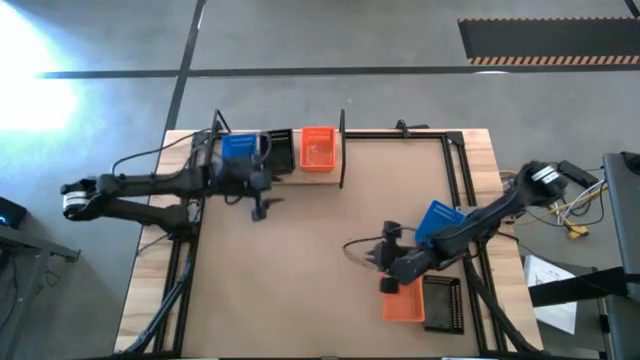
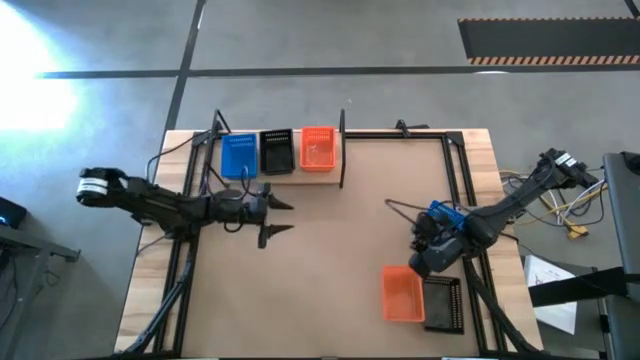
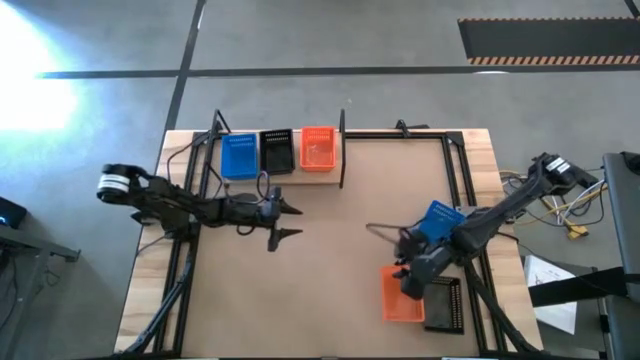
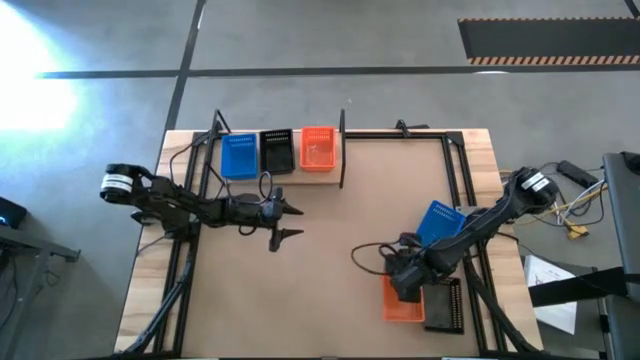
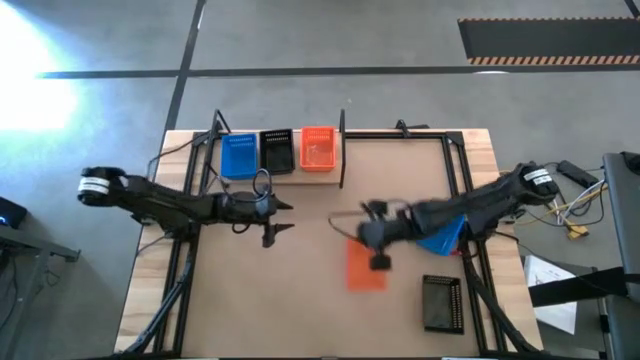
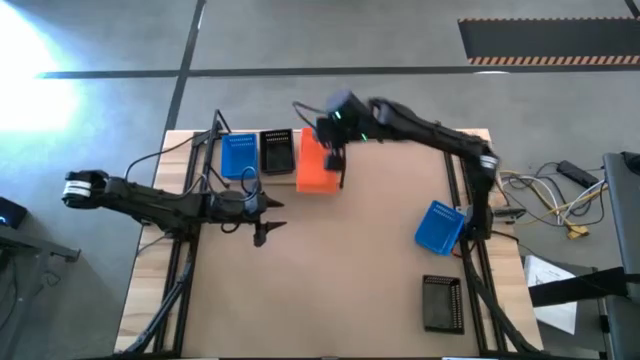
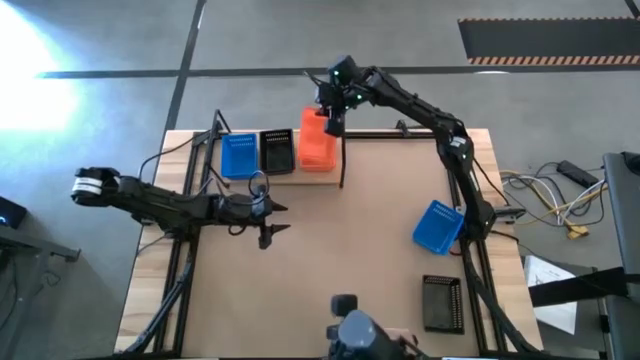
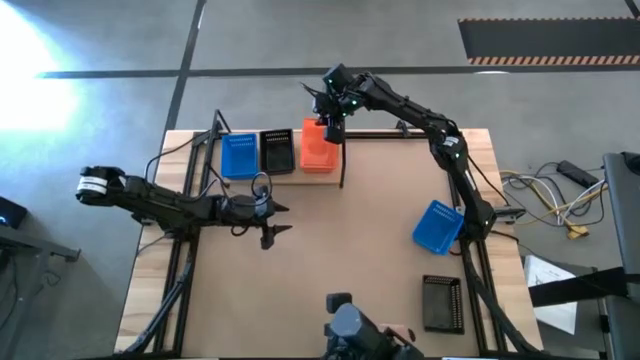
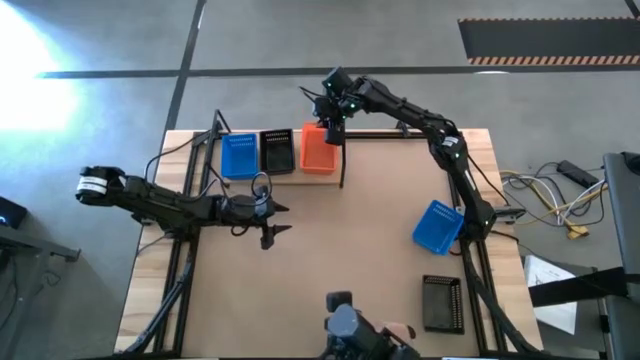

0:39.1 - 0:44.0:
Task: Stack baskets on shelf by color
Stack the orange basket on top of the other orange baskets on the shelf

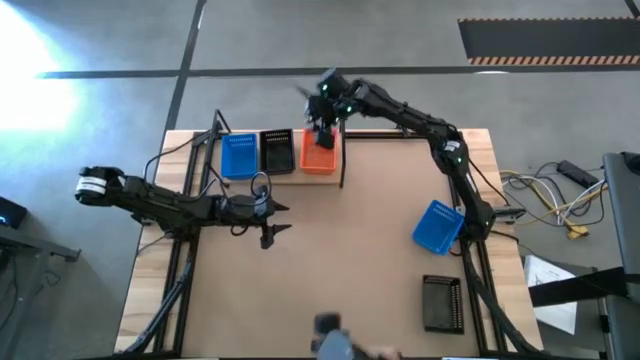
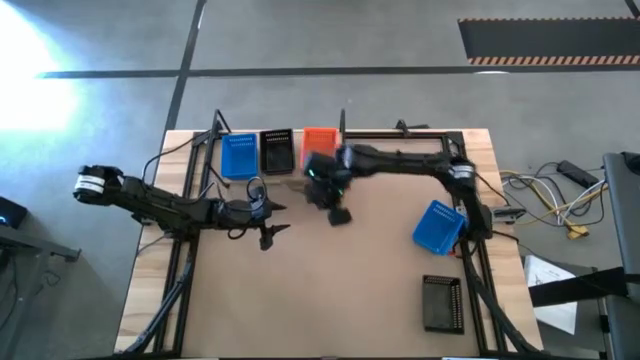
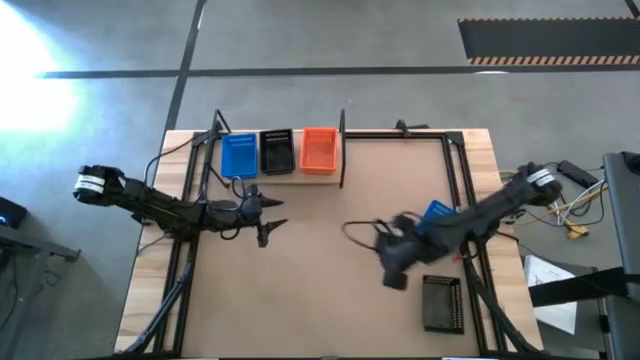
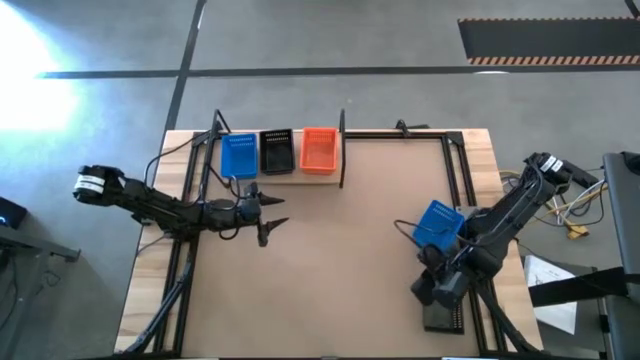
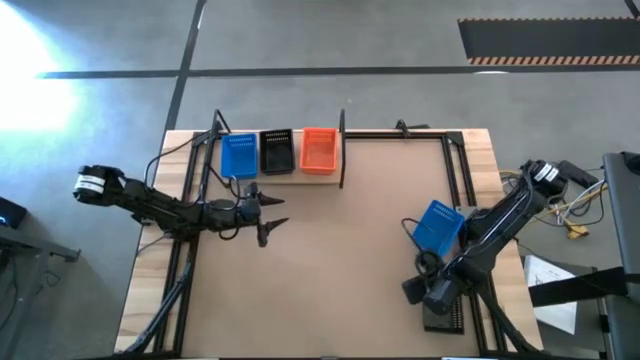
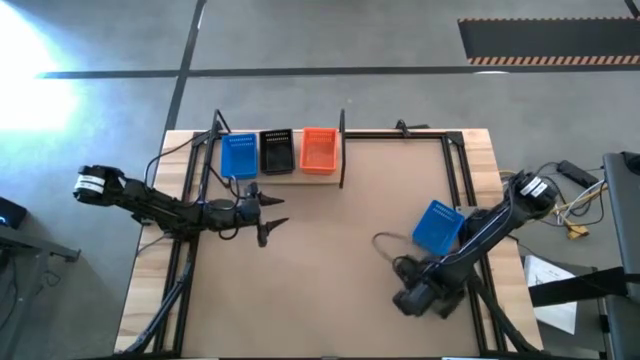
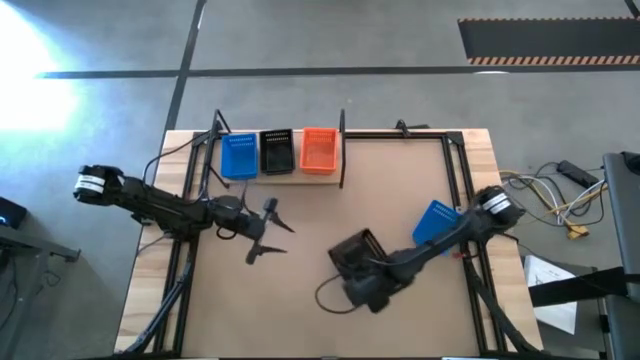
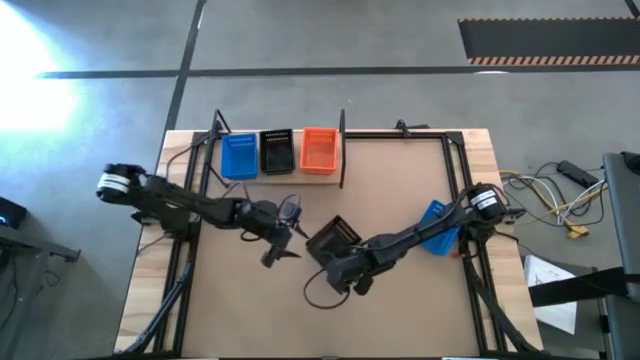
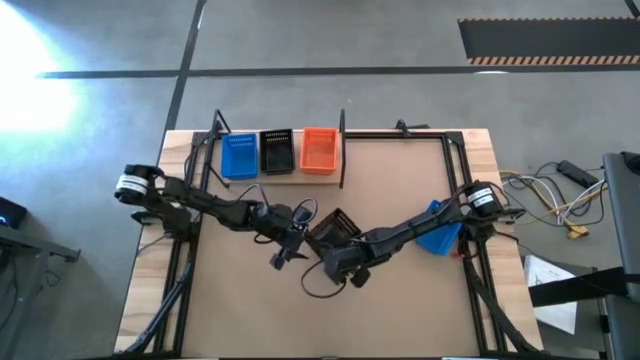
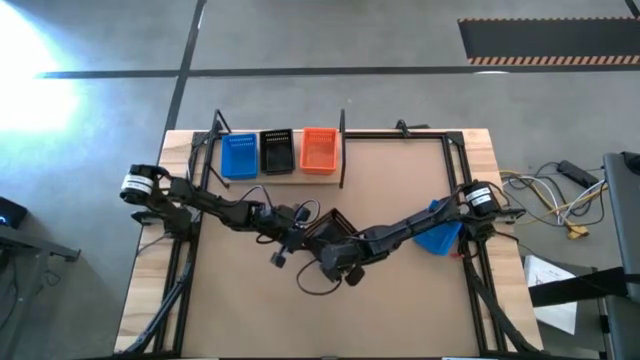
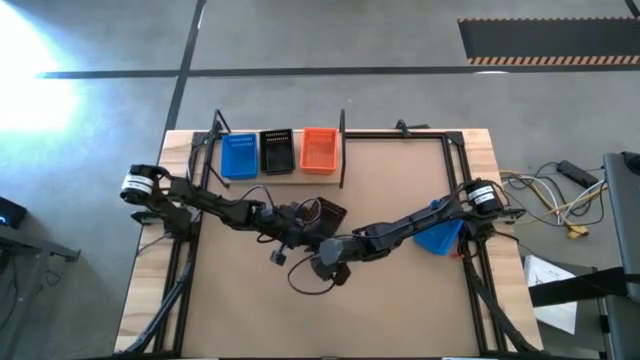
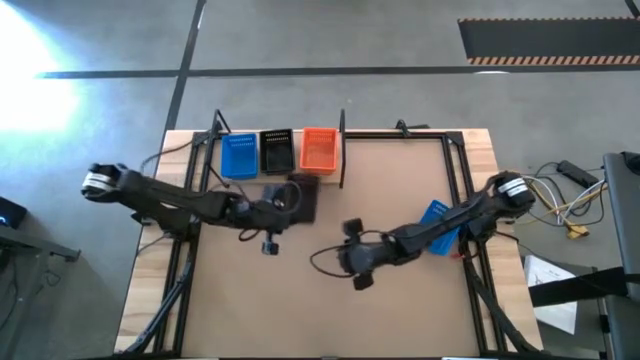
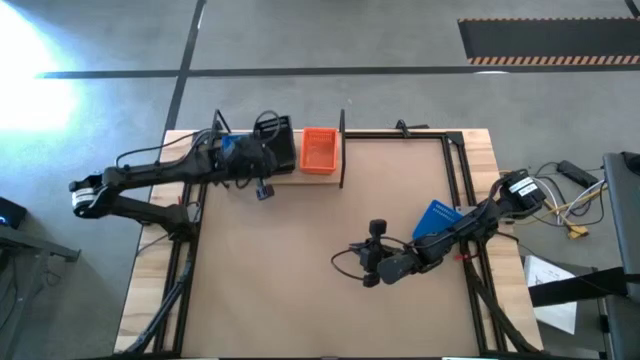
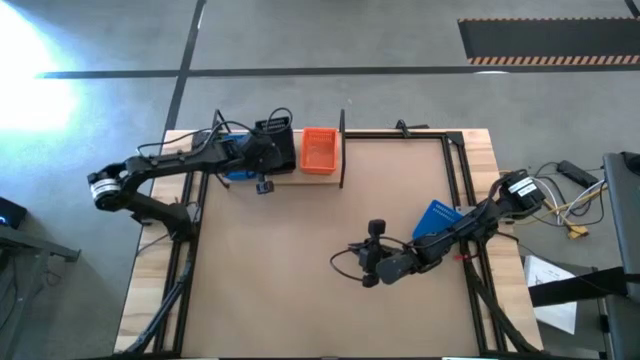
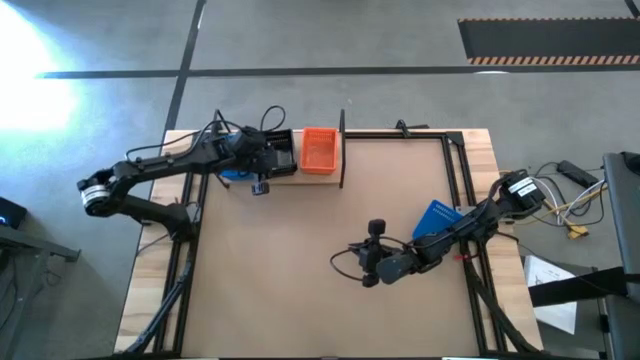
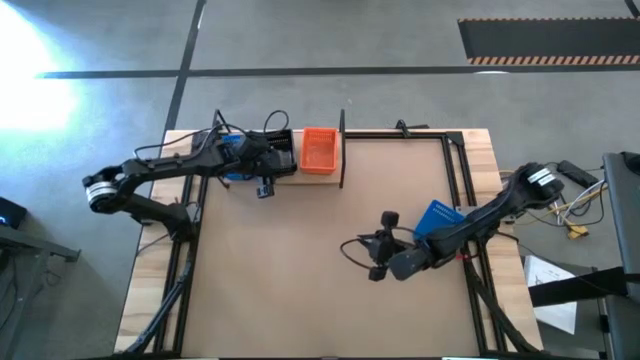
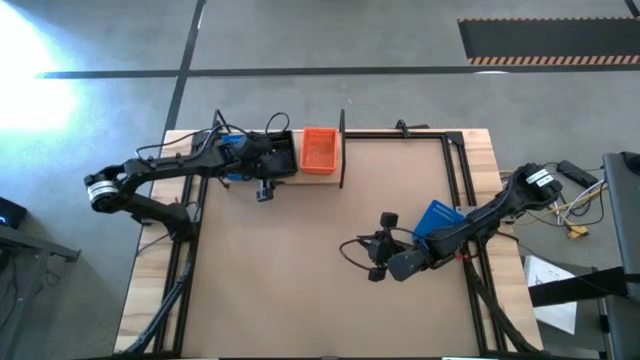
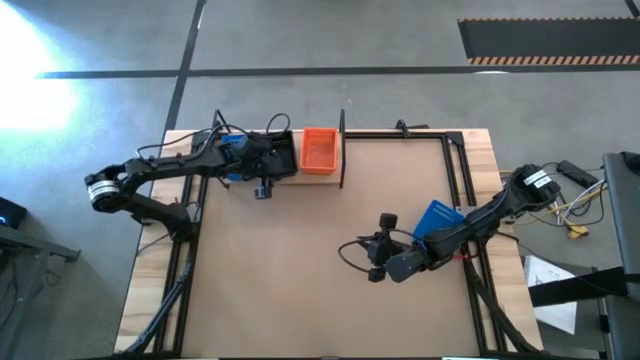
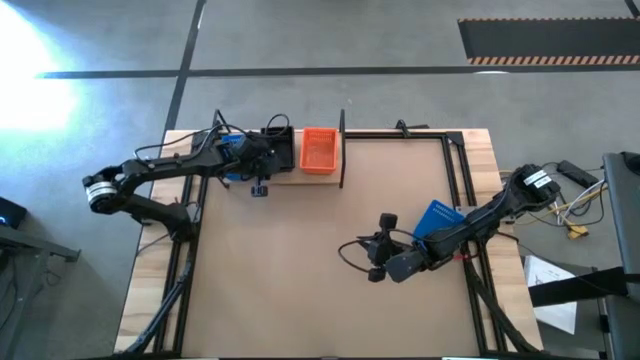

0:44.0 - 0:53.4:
Stack the black basket on top of the other black baskets on the shelf

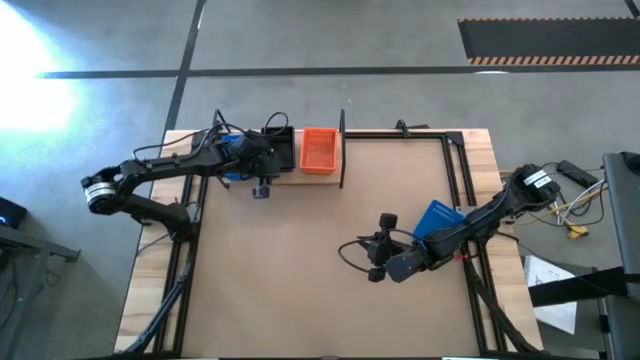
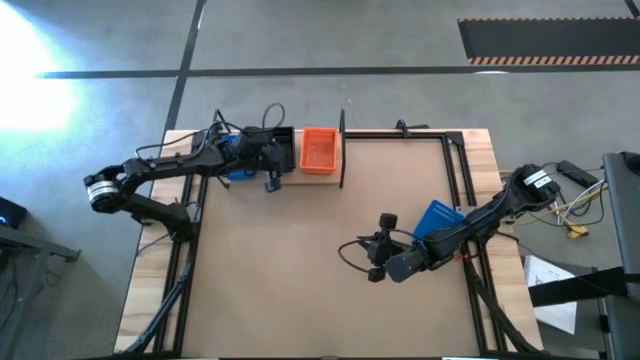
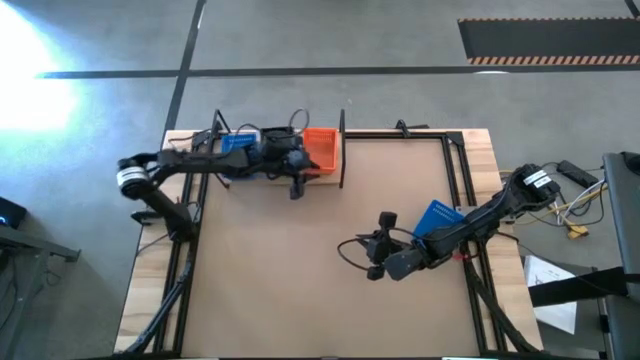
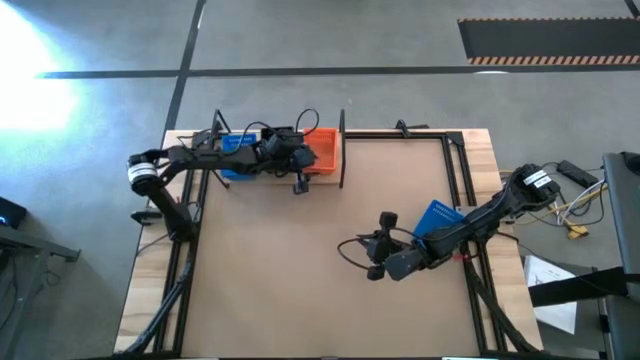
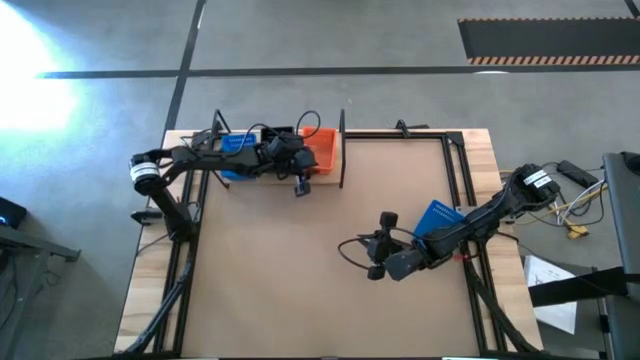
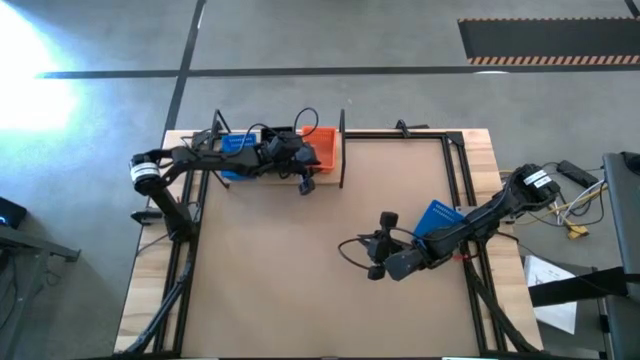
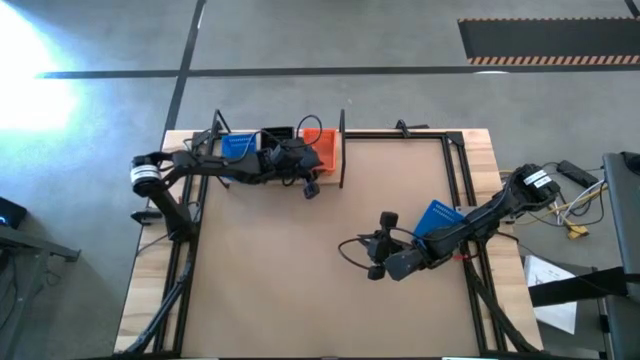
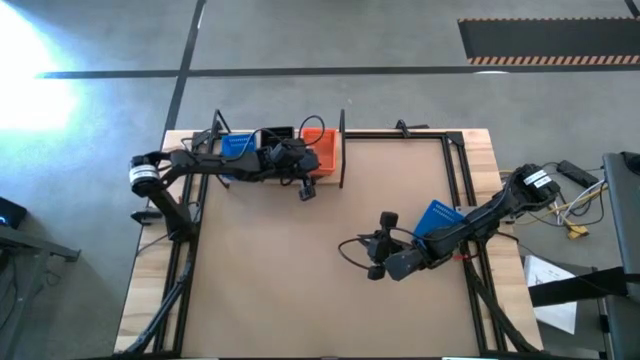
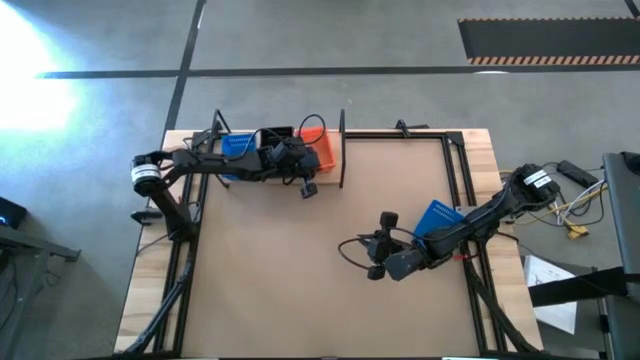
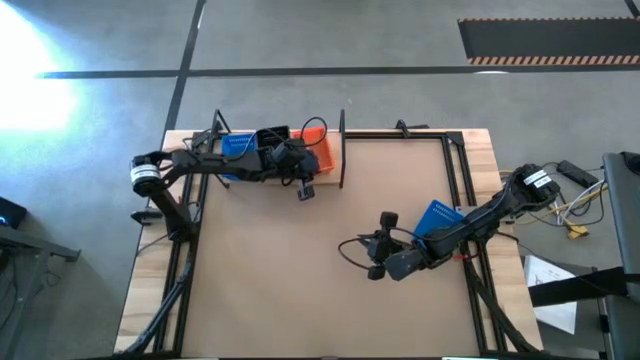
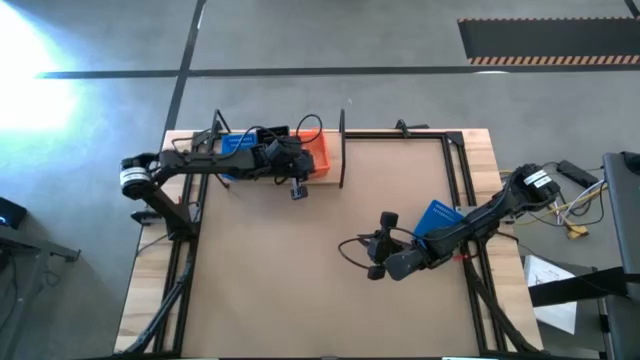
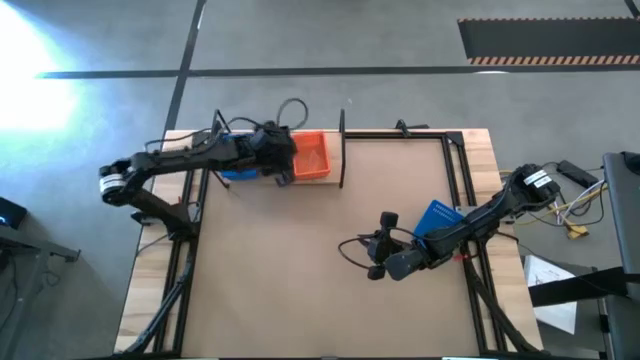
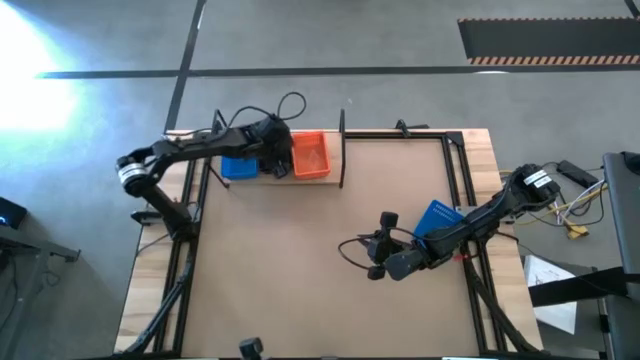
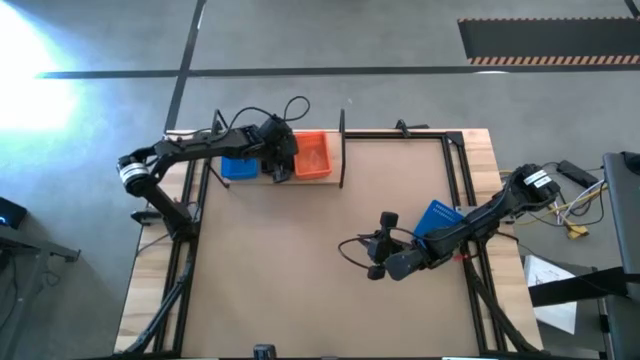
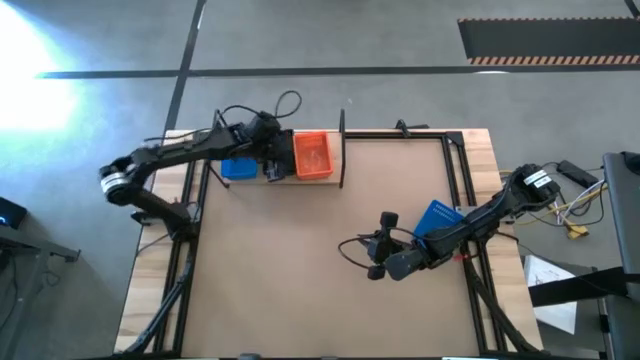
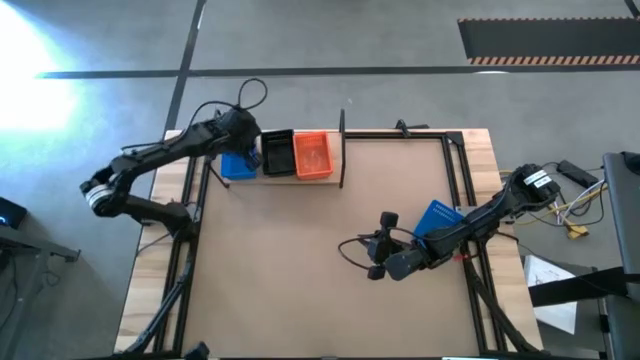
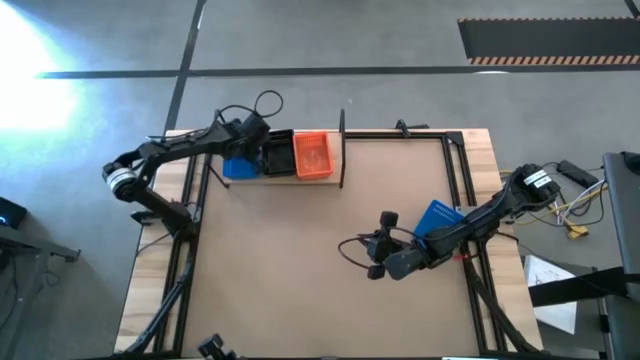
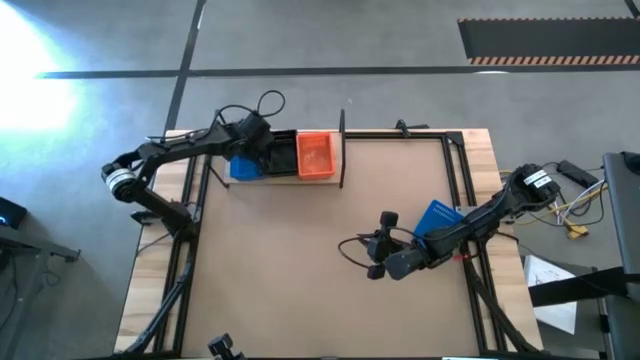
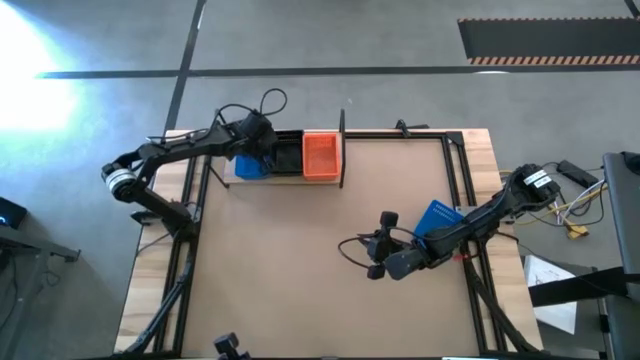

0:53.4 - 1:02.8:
Adjust the stacked basket on the shelf
